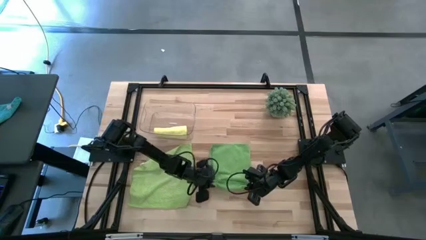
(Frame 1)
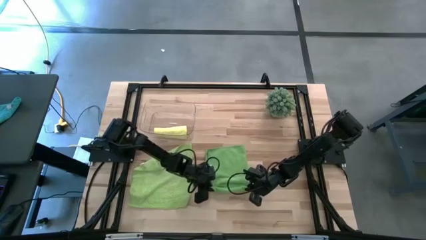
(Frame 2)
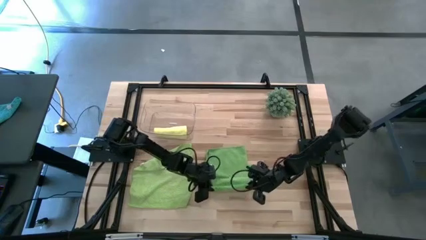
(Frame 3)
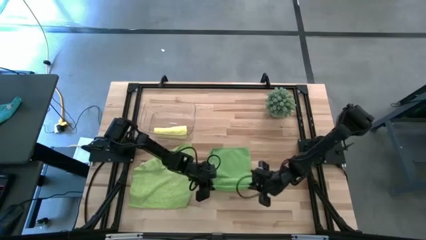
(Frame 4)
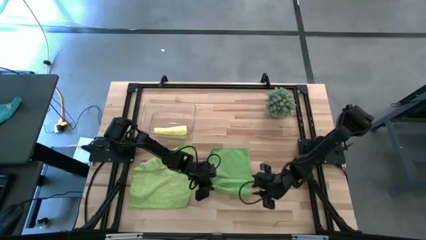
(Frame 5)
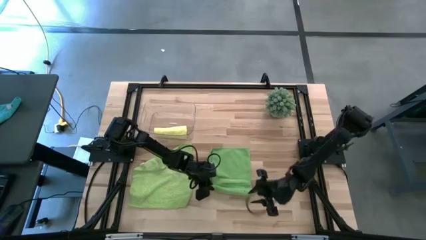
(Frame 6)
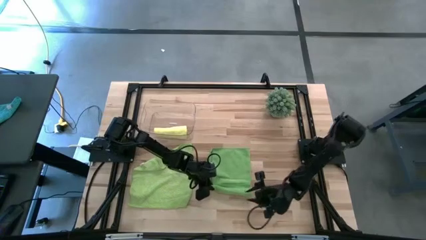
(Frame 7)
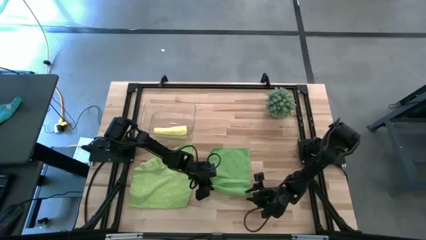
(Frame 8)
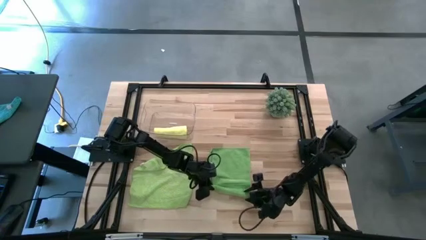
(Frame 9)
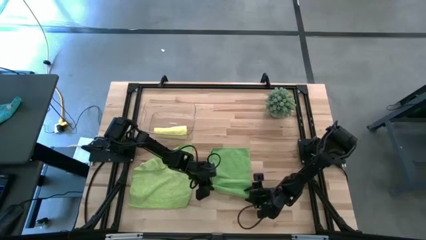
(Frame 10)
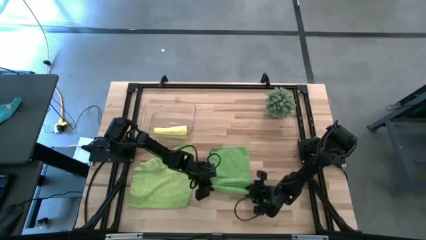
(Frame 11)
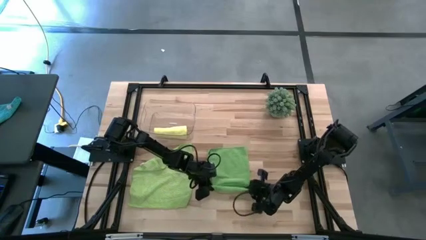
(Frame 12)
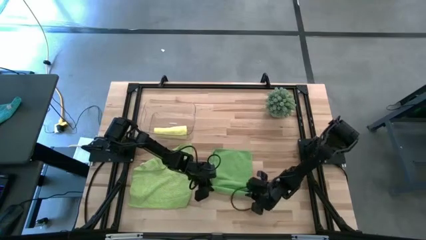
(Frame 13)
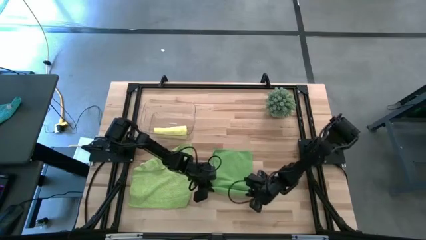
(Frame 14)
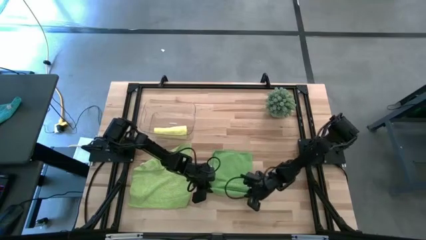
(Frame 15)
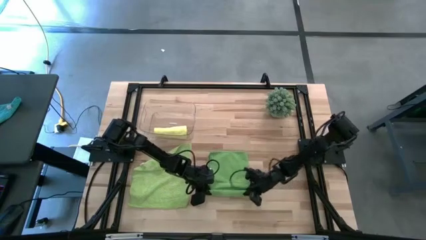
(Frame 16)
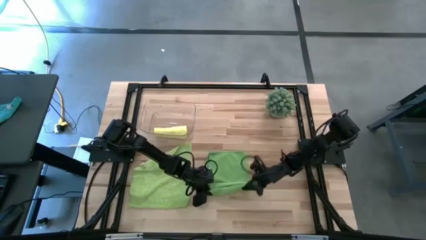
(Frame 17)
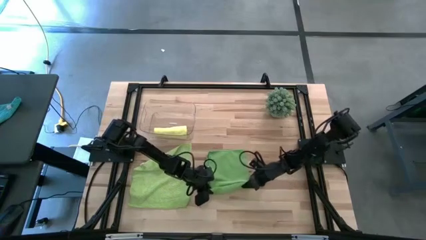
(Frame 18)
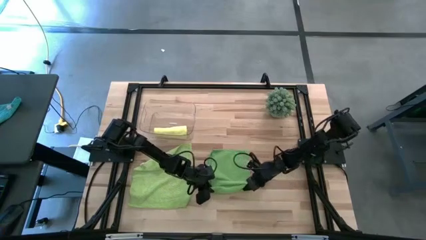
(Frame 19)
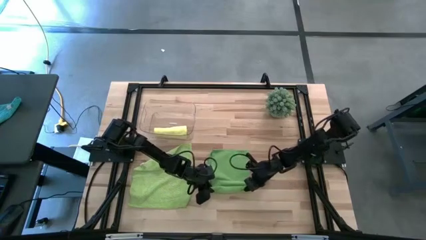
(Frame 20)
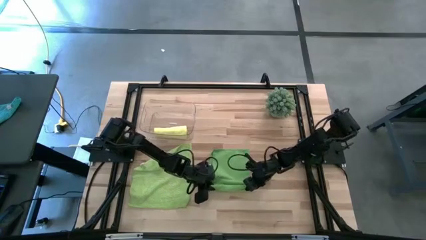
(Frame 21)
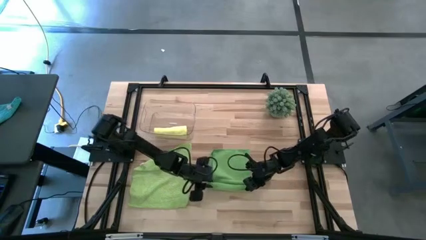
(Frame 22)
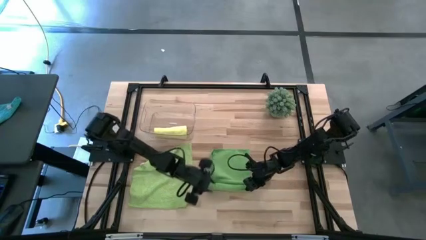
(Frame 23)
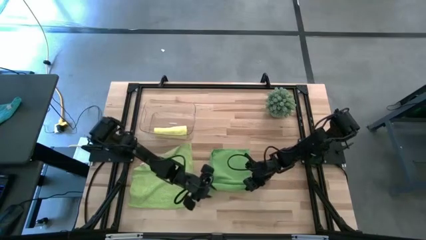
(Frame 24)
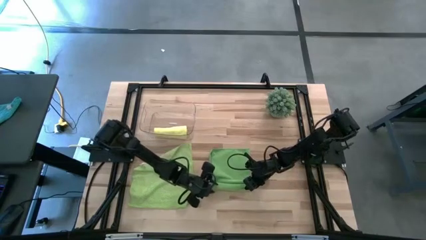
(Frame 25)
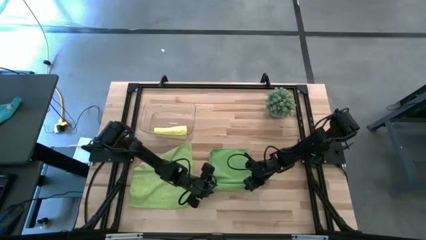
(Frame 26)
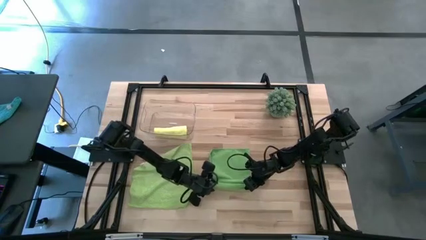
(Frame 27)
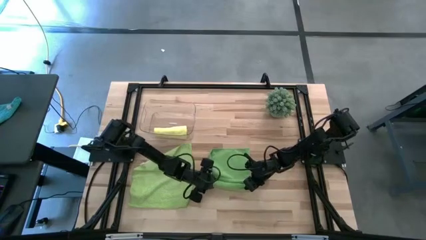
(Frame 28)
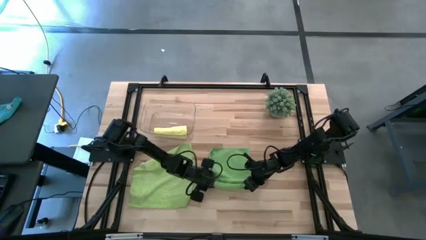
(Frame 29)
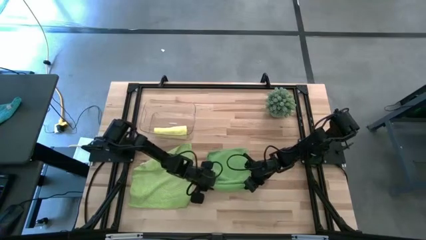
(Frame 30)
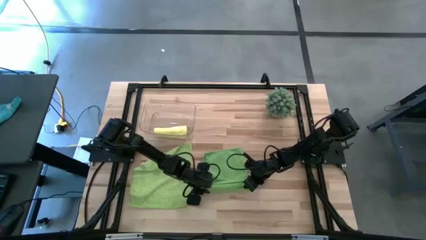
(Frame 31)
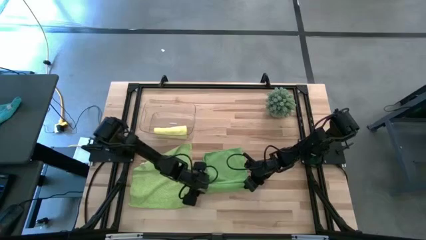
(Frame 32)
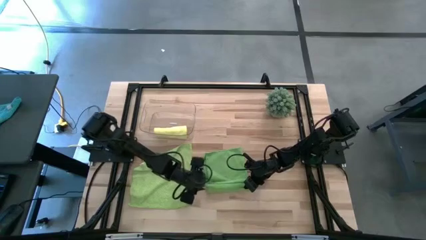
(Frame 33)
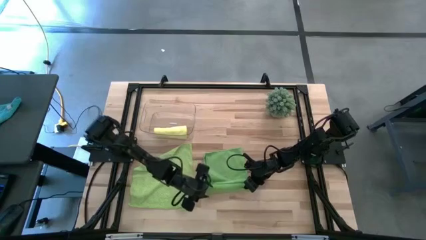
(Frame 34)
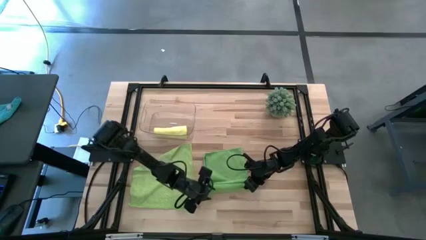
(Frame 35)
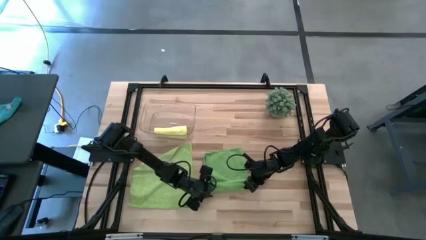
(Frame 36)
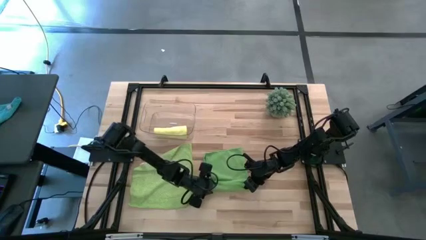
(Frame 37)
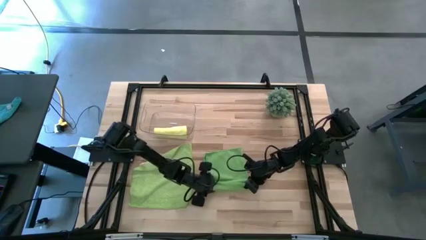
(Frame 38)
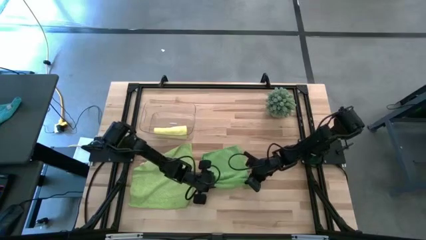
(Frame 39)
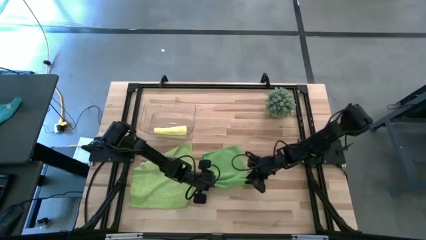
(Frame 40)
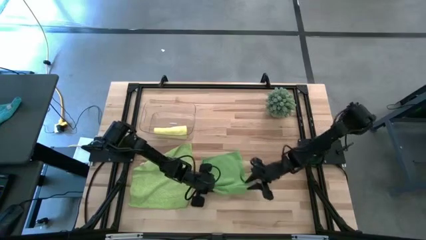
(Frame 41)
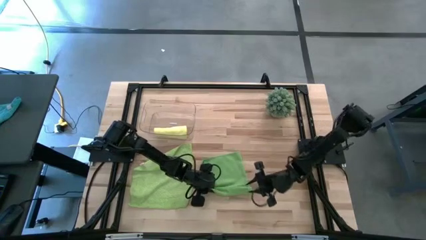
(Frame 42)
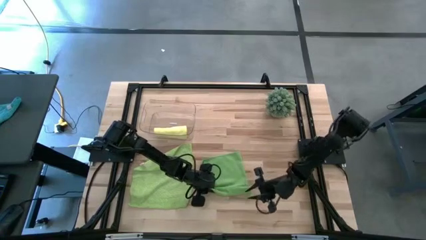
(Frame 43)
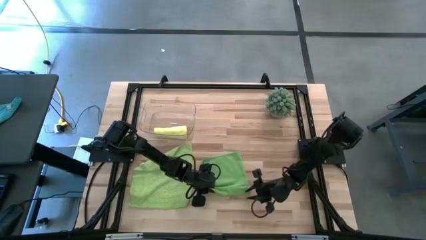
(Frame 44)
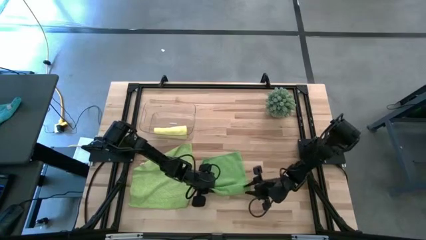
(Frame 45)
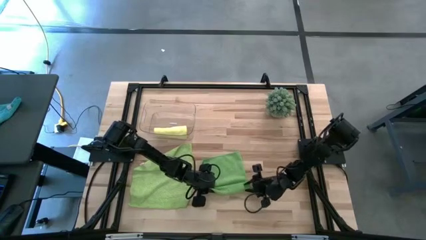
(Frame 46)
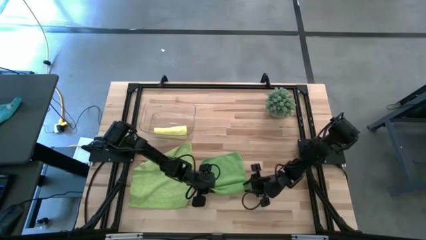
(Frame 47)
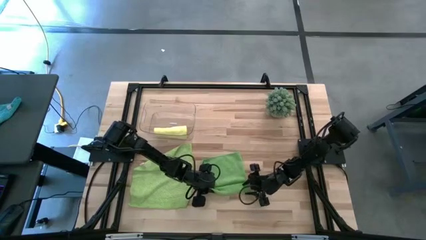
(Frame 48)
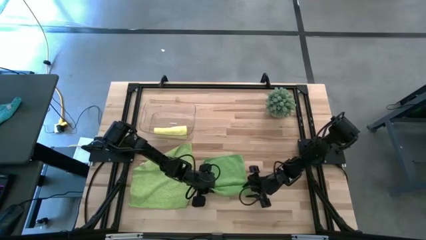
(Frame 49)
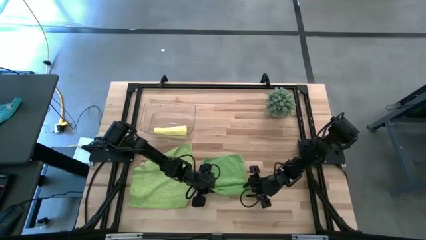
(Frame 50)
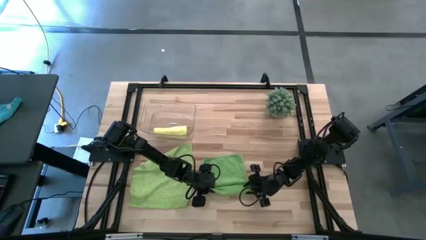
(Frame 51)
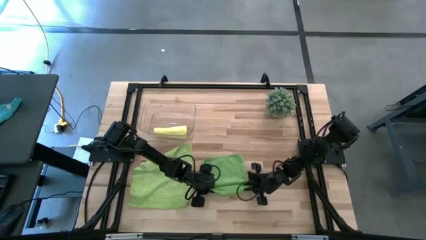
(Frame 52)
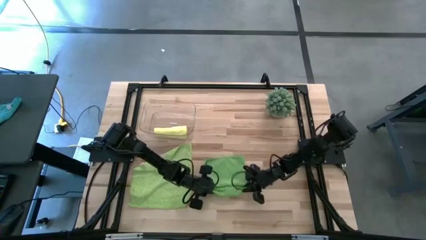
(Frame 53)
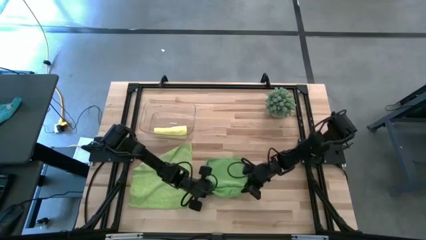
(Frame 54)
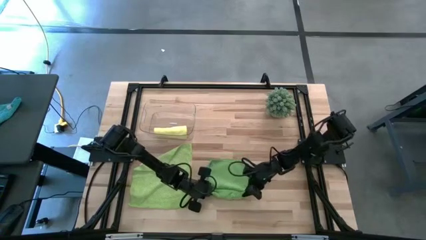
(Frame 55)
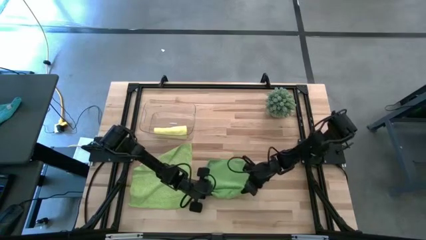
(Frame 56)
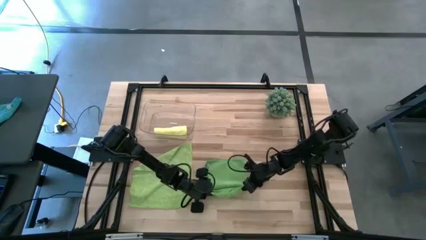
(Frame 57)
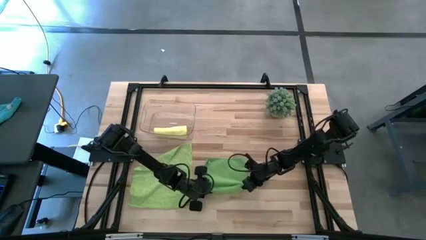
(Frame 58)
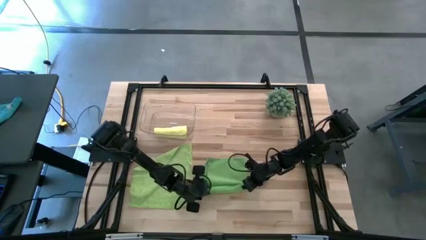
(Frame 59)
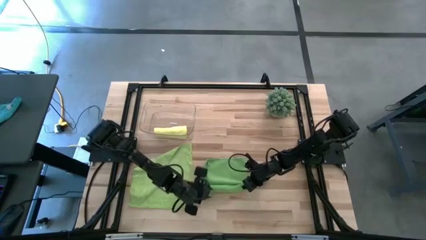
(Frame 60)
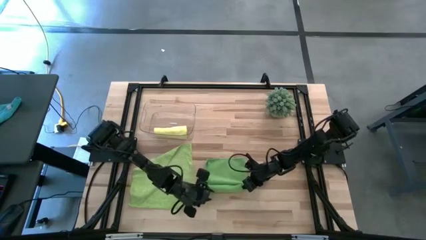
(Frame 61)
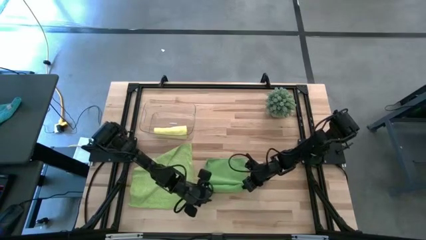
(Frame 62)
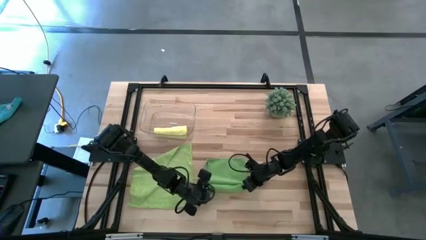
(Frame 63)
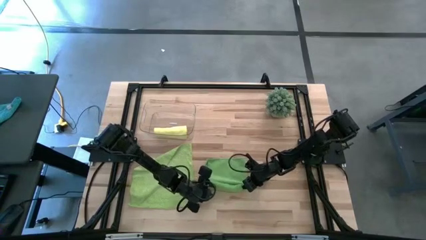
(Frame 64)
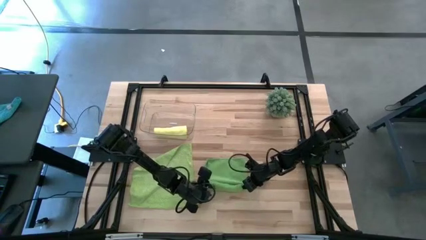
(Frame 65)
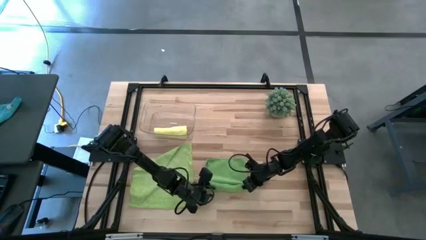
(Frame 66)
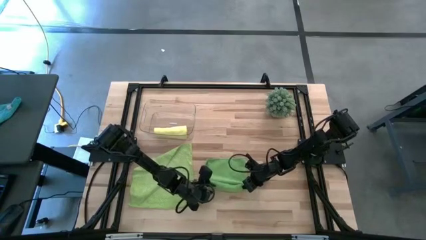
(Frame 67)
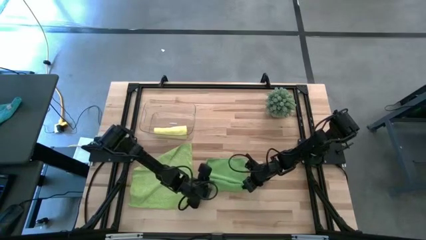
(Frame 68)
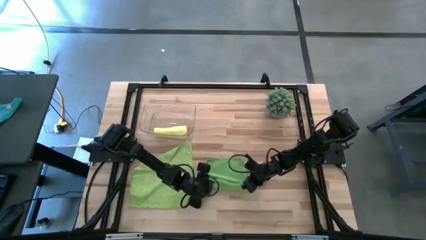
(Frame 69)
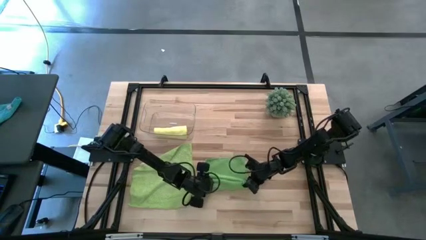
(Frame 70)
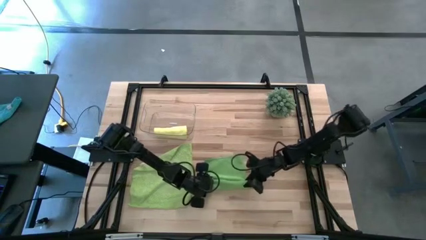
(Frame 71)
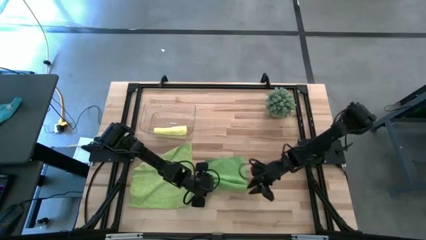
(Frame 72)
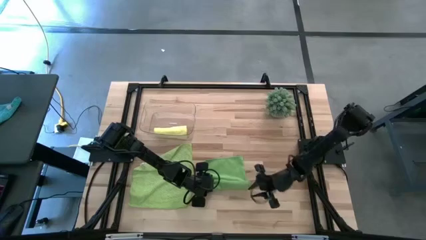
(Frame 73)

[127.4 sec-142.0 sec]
Task: Roll microfiber towels into tight, uniform cylinder then place into a basket
Roll the right green towel
